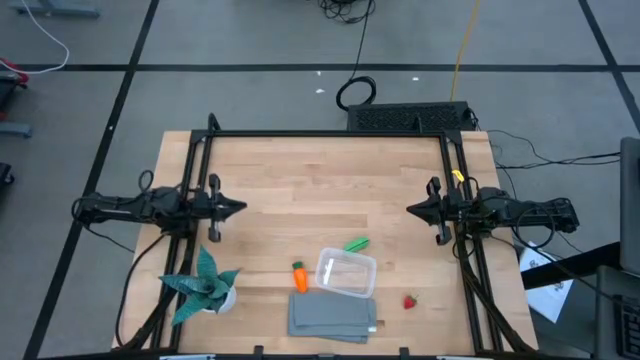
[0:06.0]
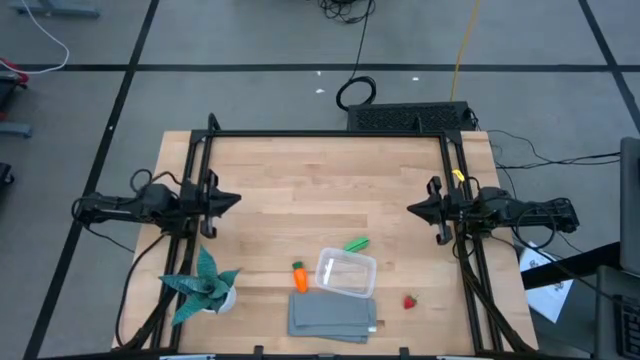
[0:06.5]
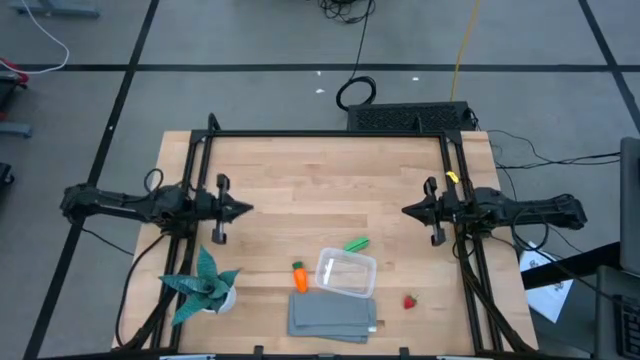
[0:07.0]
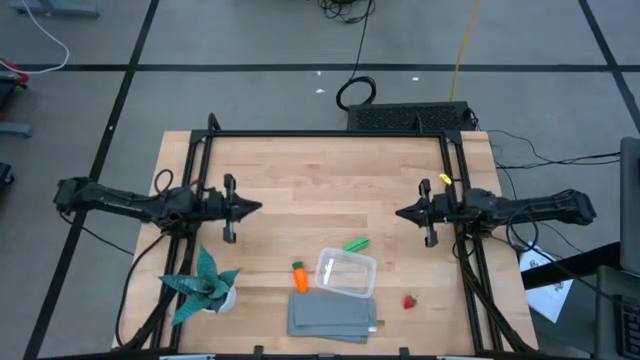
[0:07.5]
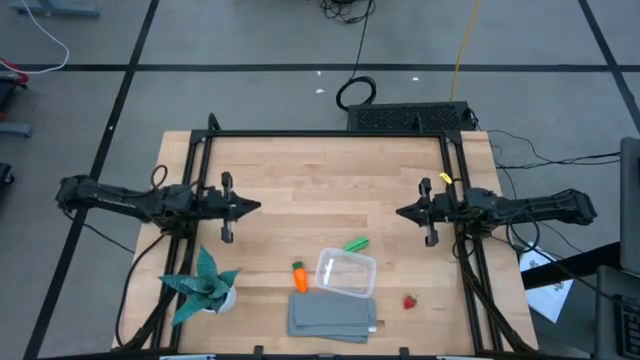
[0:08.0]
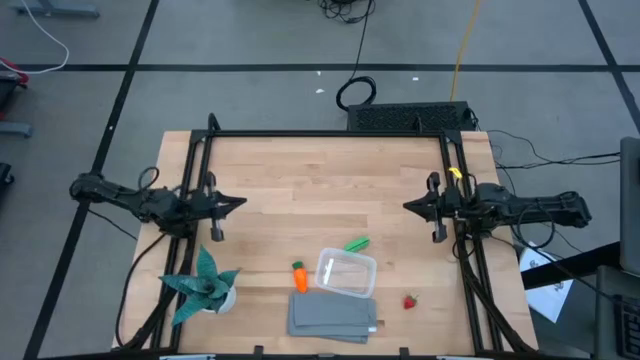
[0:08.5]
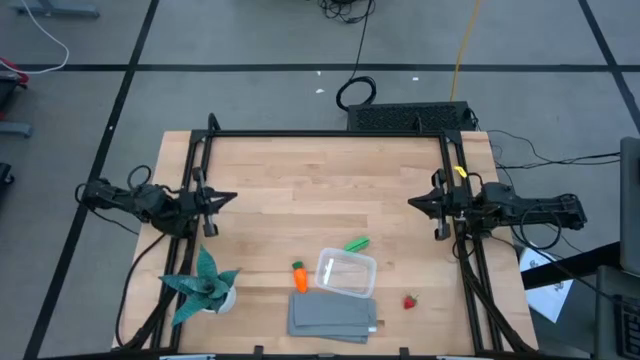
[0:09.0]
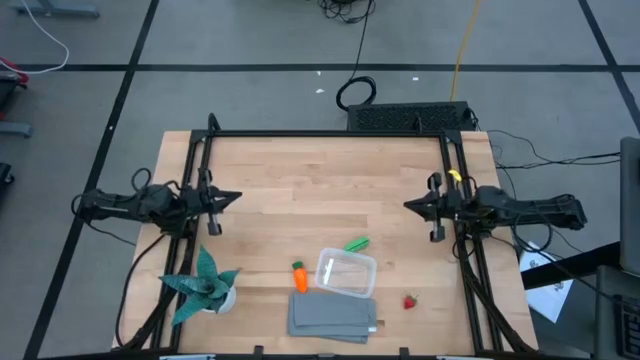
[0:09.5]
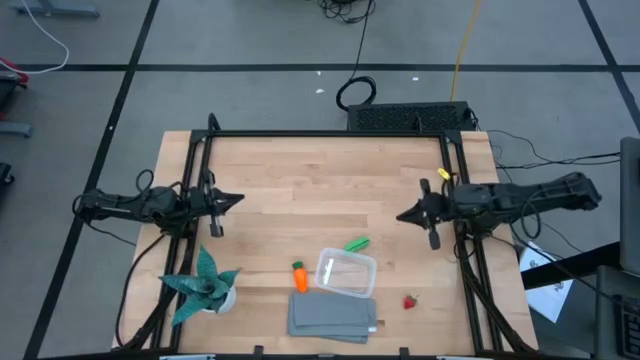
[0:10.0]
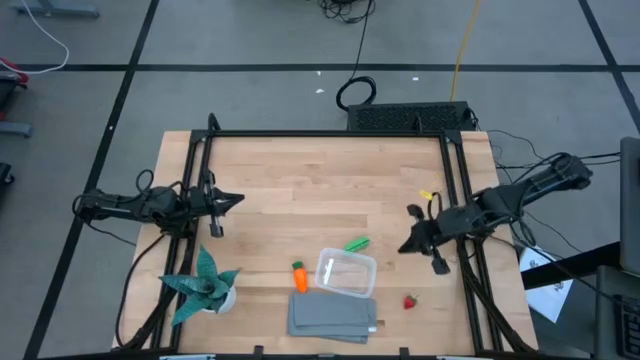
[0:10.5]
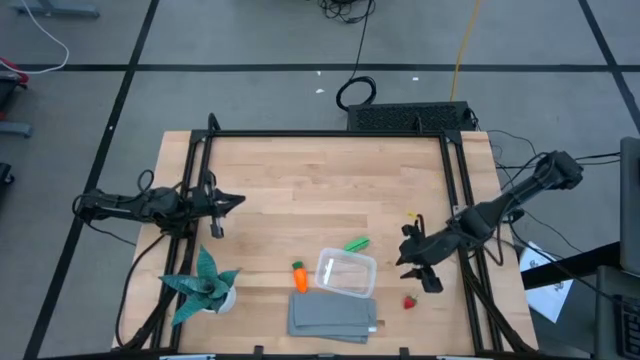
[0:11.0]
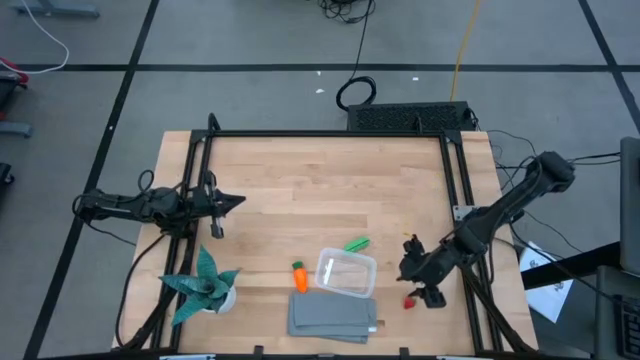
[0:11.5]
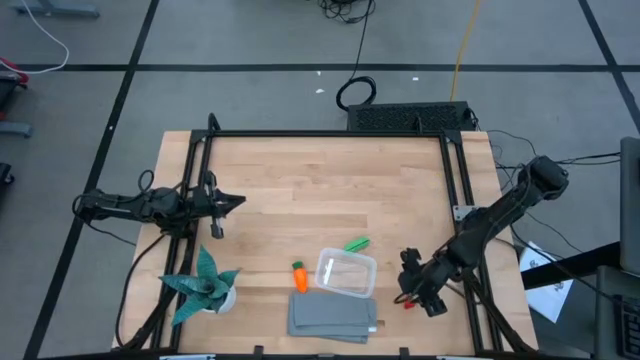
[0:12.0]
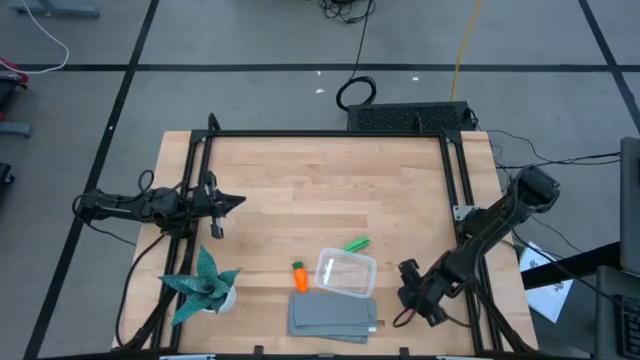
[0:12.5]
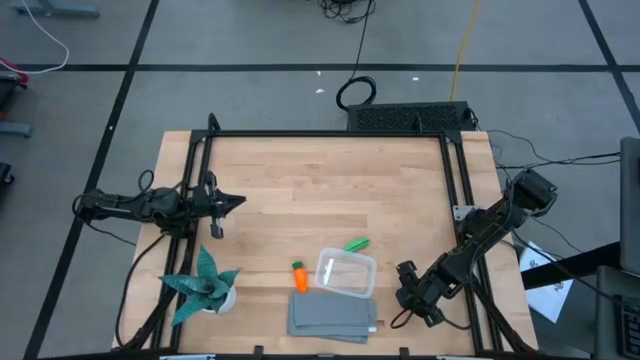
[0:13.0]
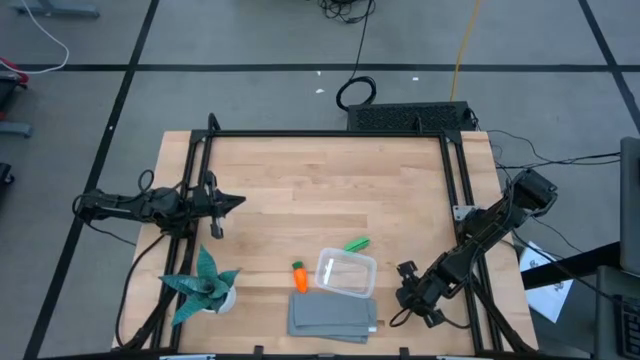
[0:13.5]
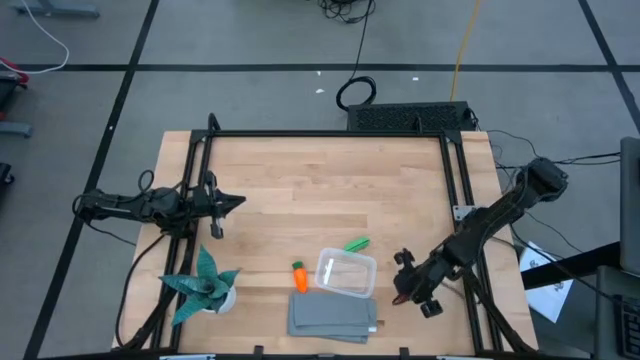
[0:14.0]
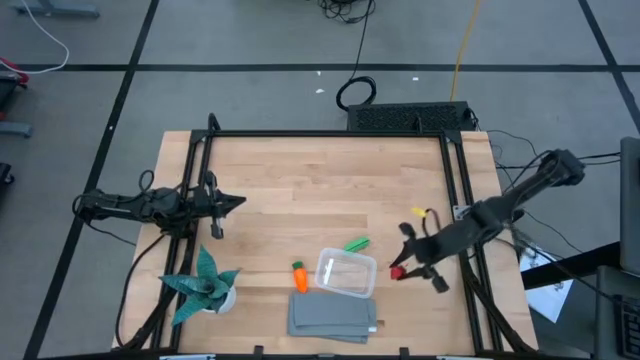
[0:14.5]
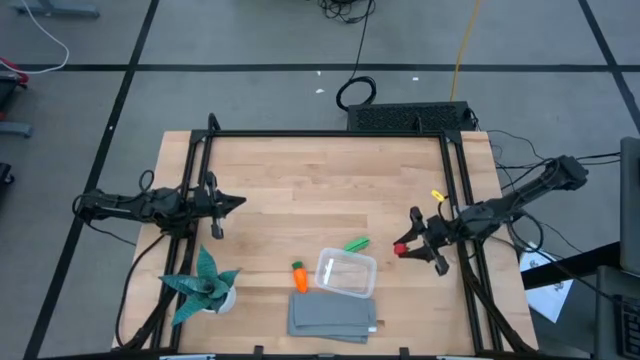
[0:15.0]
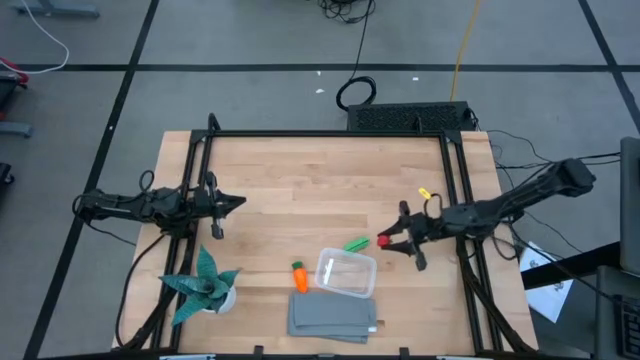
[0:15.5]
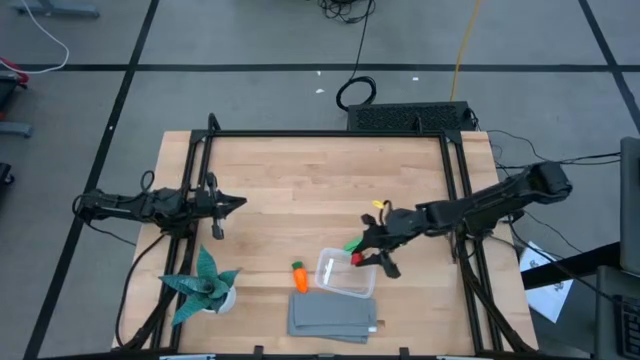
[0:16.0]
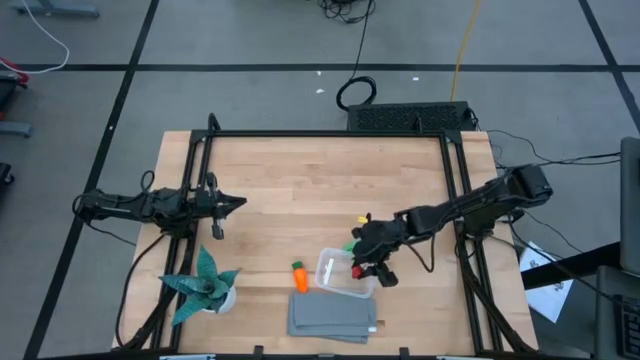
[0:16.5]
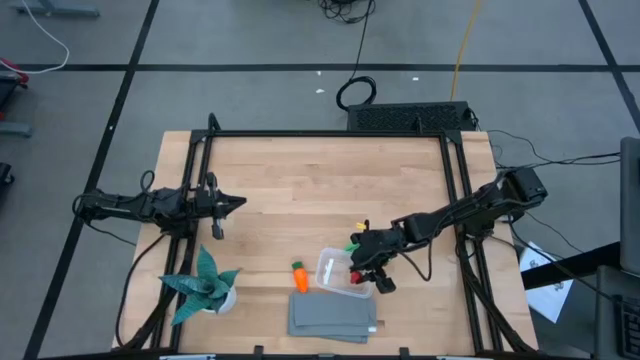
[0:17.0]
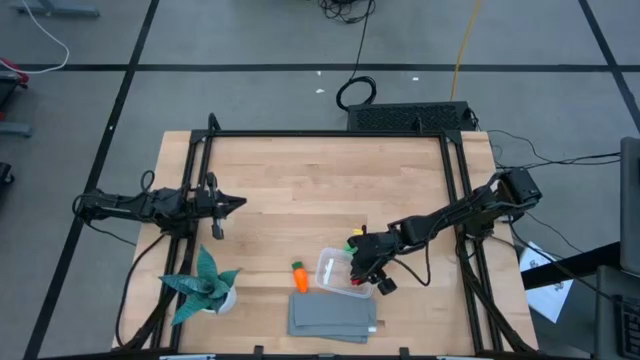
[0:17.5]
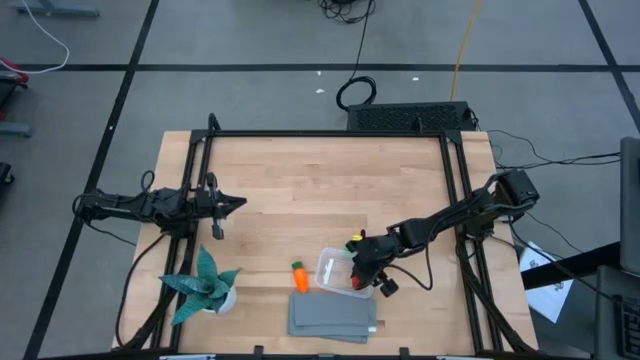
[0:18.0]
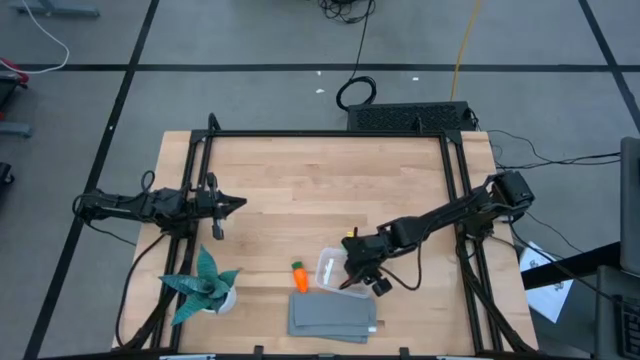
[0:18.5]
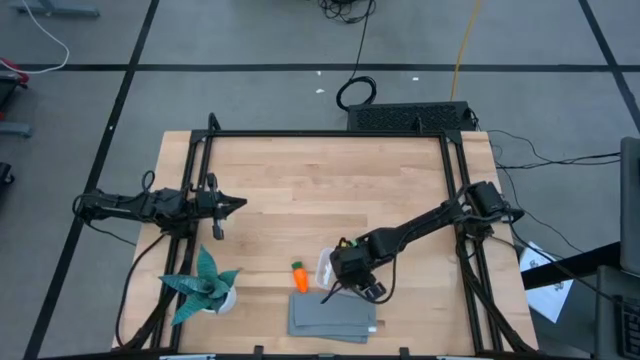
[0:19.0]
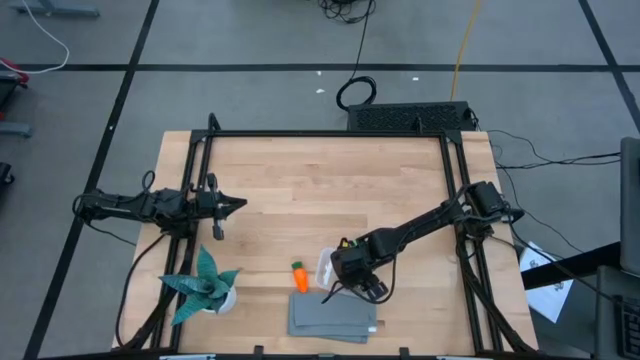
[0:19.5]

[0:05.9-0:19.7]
Task: Pick and placing Produce into tupperware
Put the red strawberry into the transparent bin

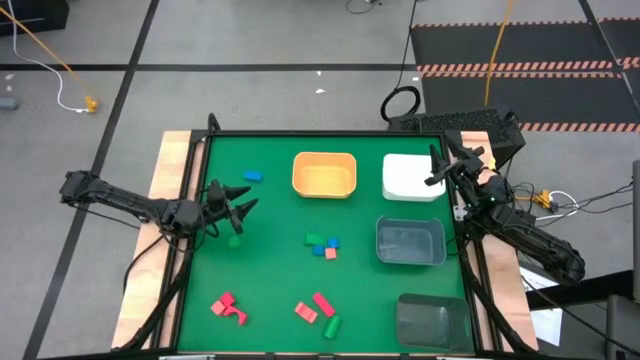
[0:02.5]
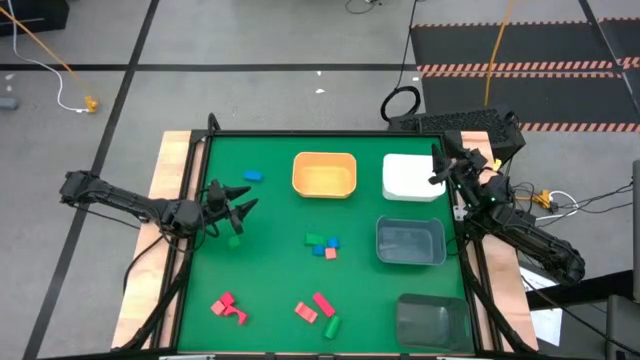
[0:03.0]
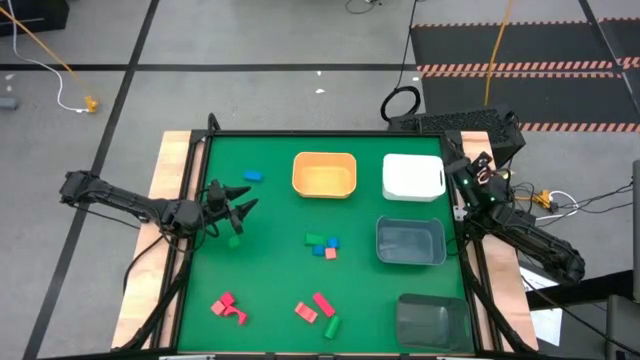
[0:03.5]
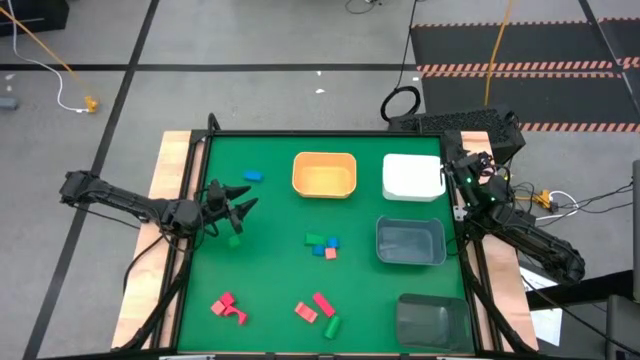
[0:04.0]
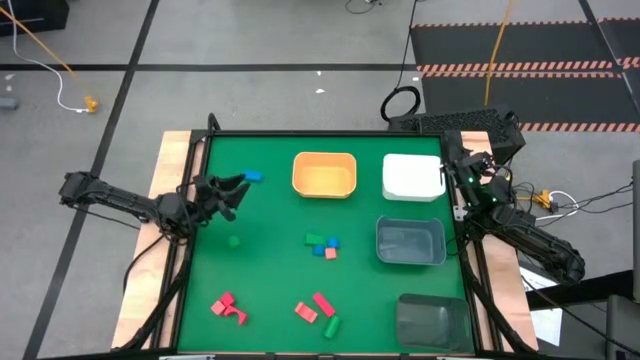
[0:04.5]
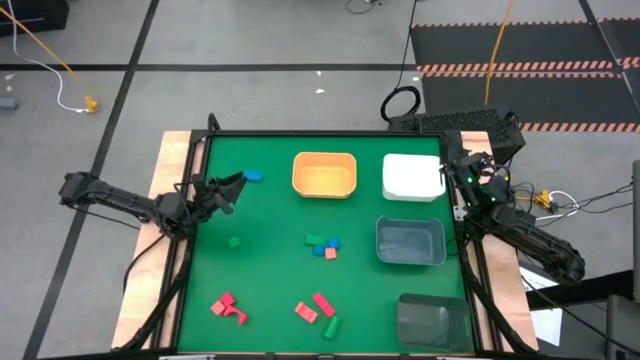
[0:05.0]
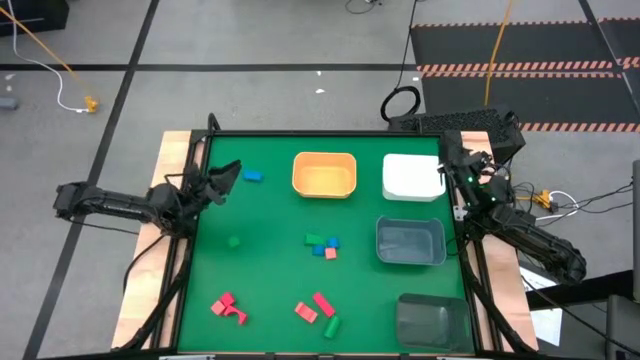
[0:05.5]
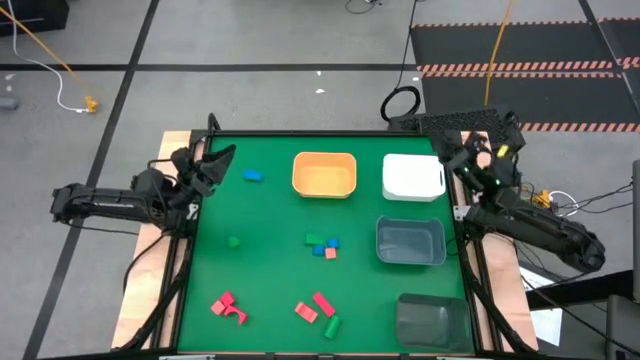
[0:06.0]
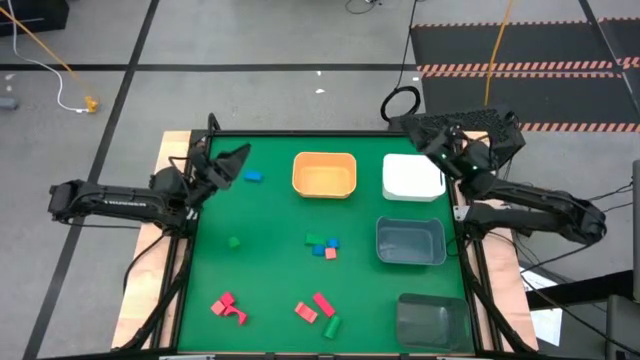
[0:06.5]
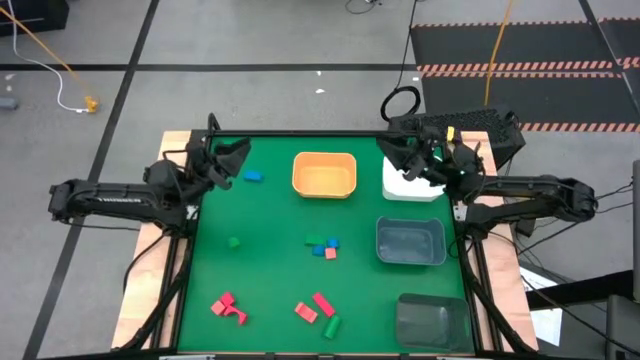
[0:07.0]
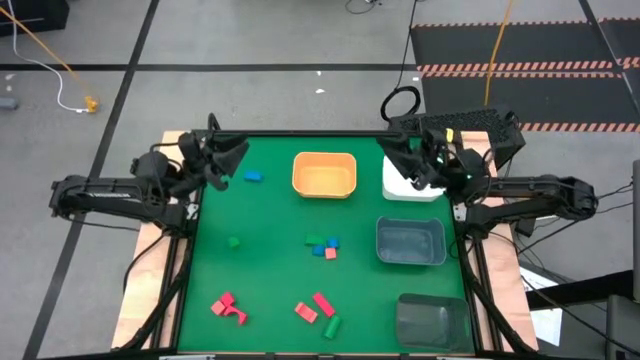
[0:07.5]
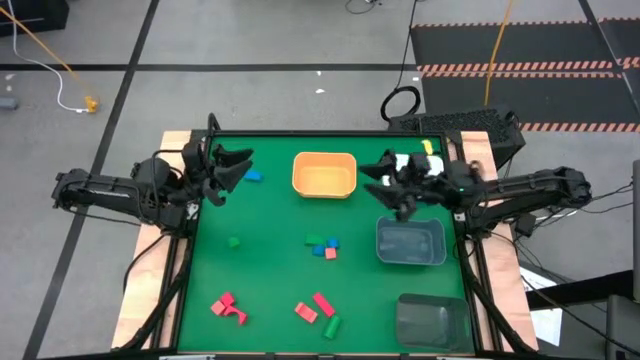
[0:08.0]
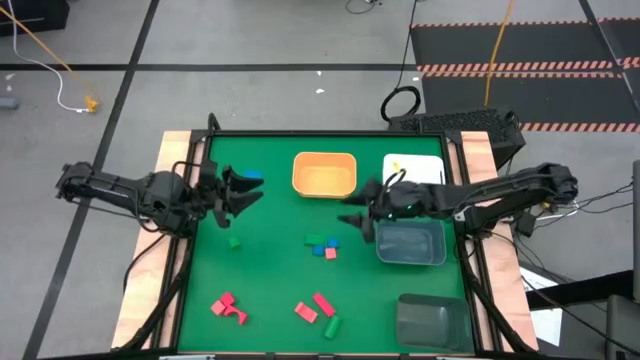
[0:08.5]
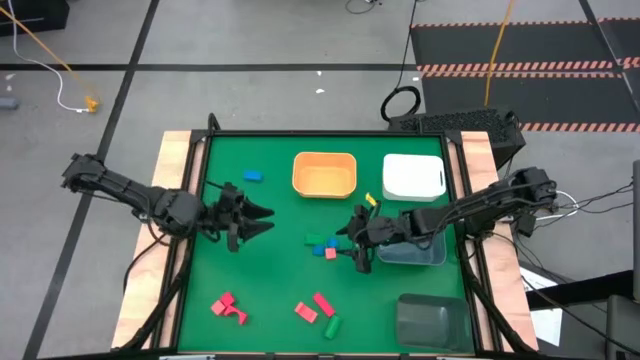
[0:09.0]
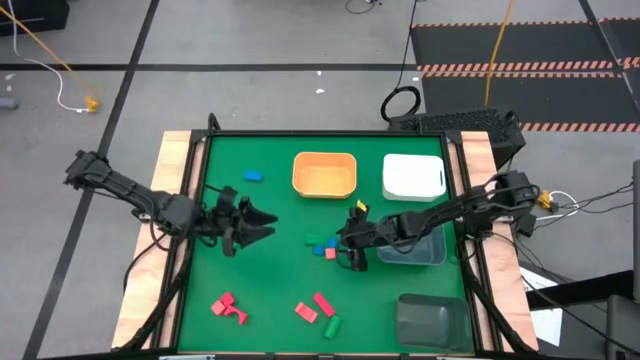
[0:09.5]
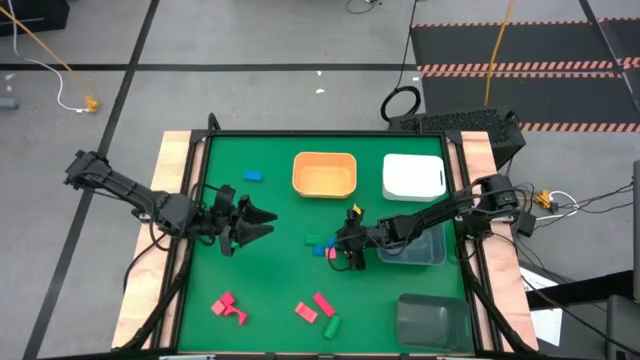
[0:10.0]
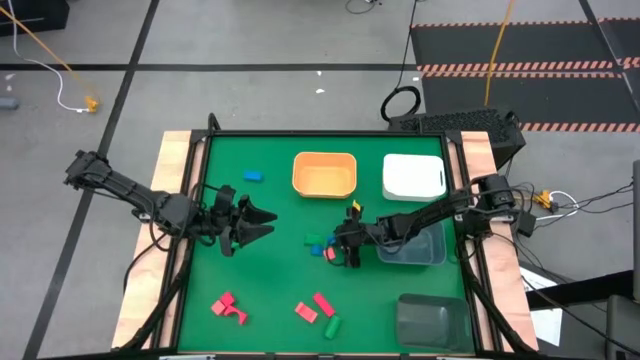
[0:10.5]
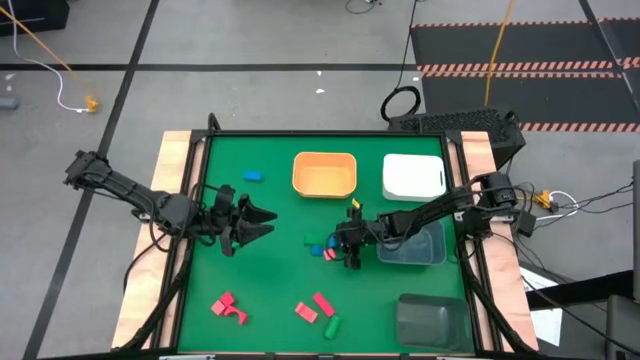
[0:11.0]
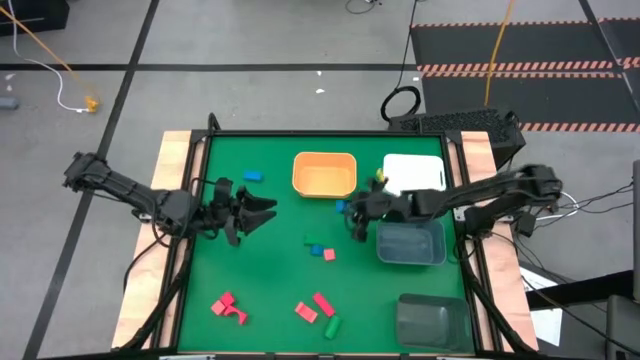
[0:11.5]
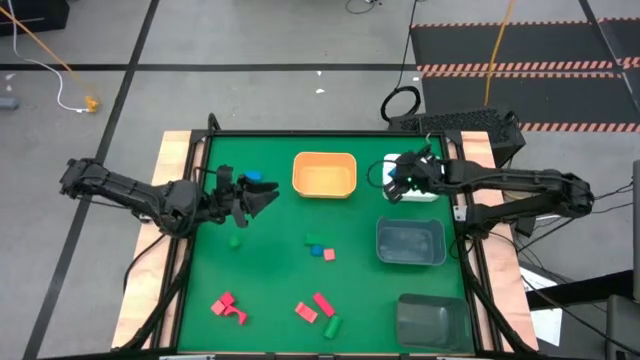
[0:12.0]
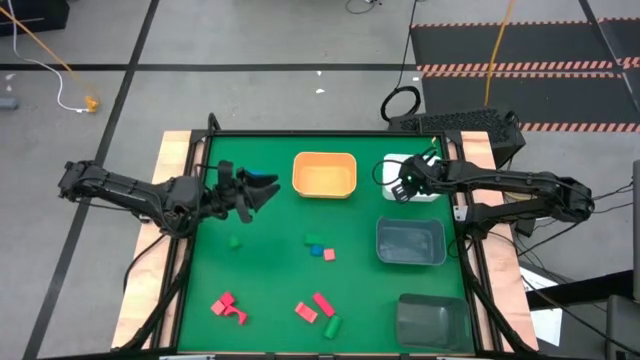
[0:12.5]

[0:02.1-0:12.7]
Task: Sort & place blocks by color
Put the right blue block into the white bin
